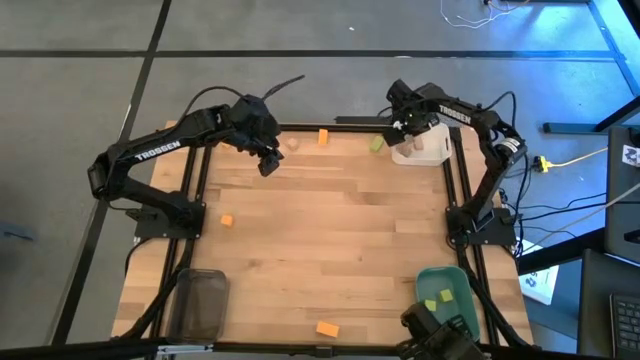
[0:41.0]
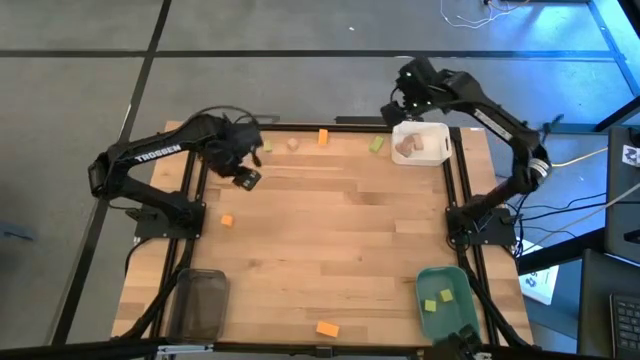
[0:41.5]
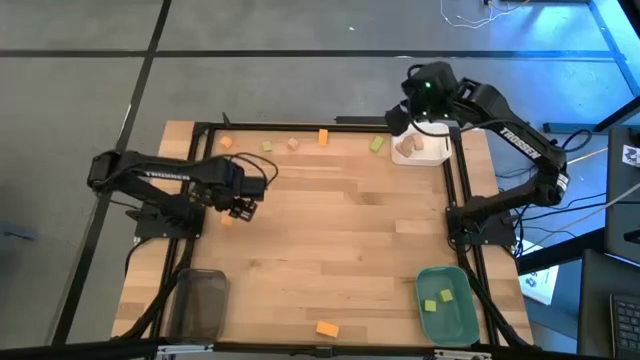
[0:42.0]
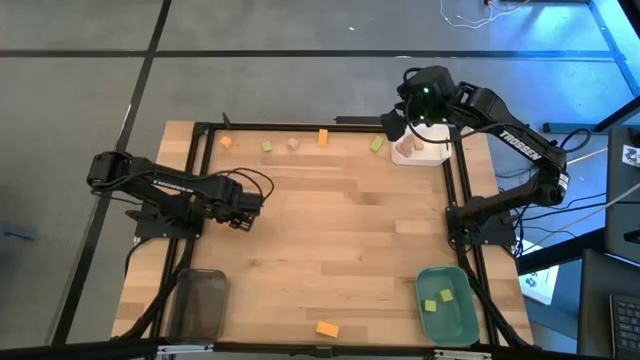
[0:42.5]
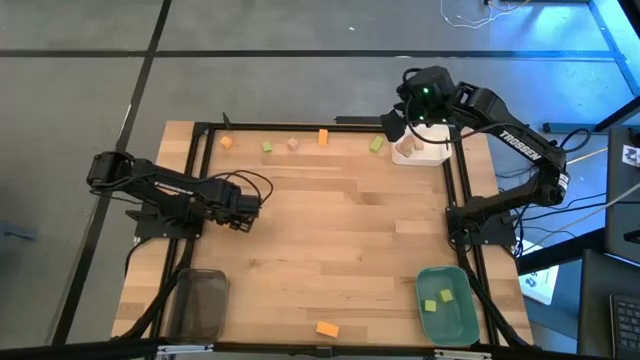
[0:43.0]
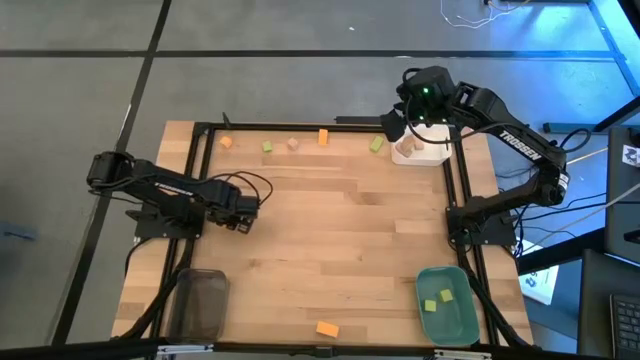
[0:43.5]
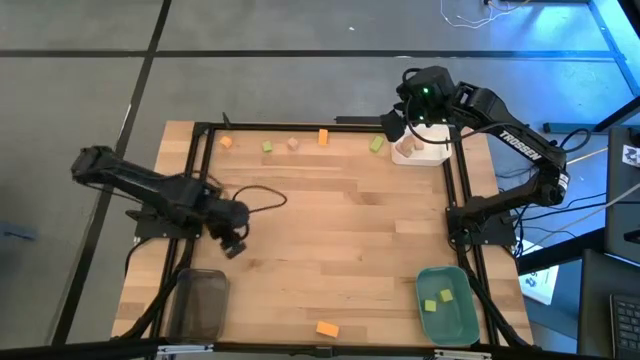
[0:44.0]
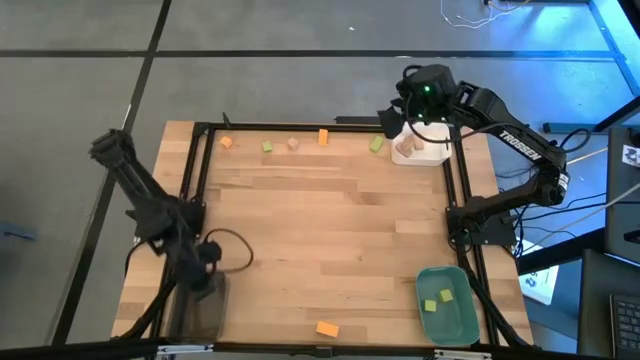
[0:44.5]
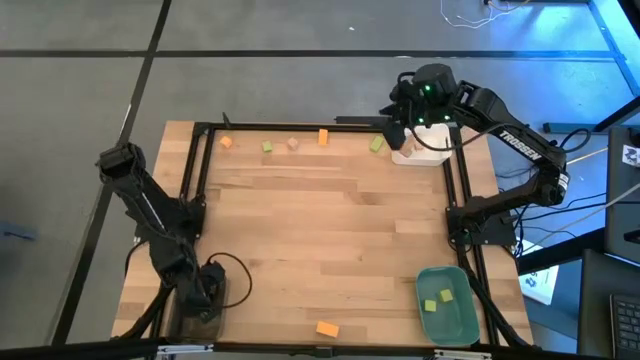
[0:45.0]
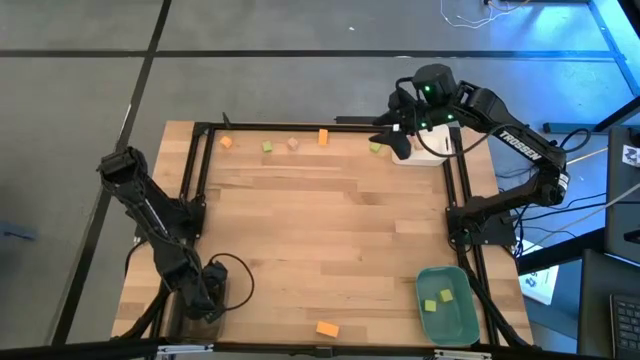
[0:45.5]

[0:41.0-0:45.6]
Task: Sort & place blocks by color
Put the bottom left yellow block into the black bin

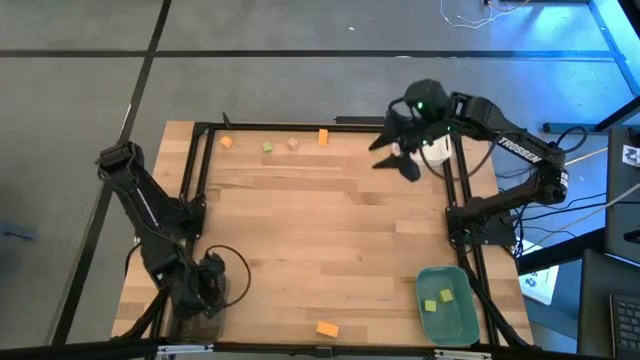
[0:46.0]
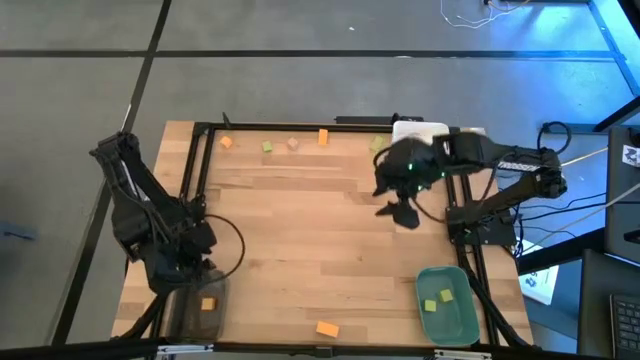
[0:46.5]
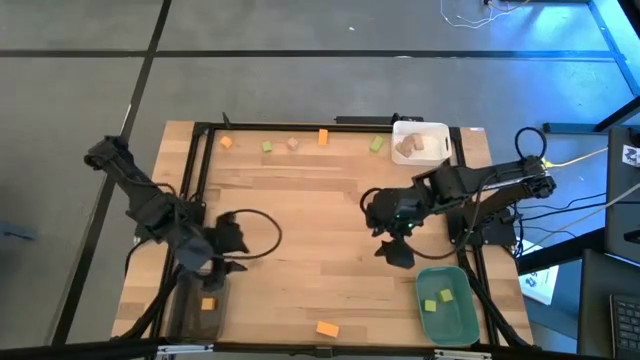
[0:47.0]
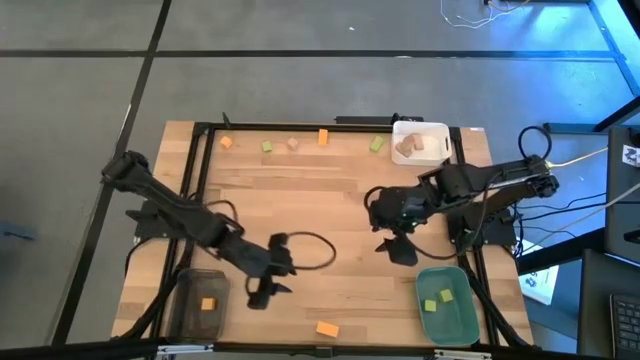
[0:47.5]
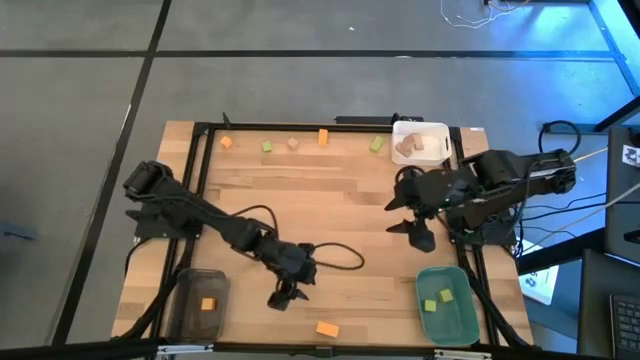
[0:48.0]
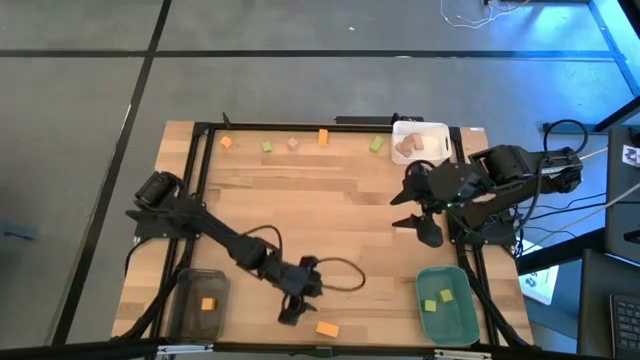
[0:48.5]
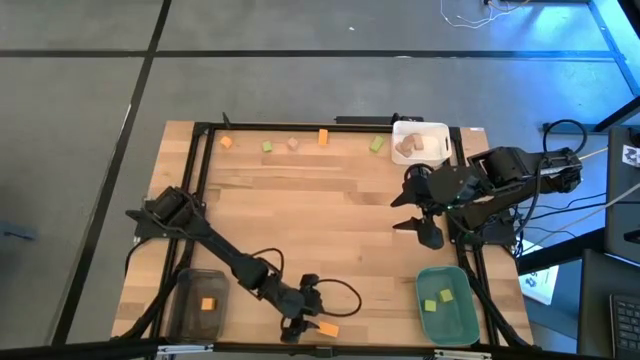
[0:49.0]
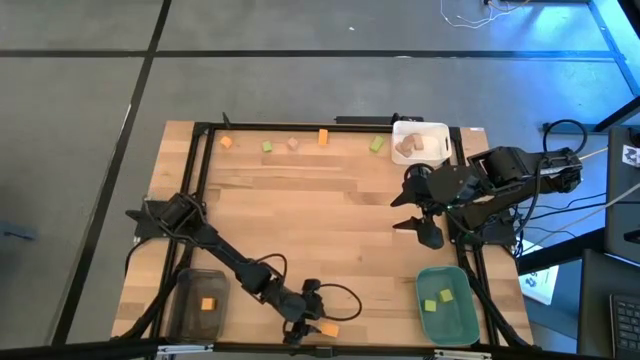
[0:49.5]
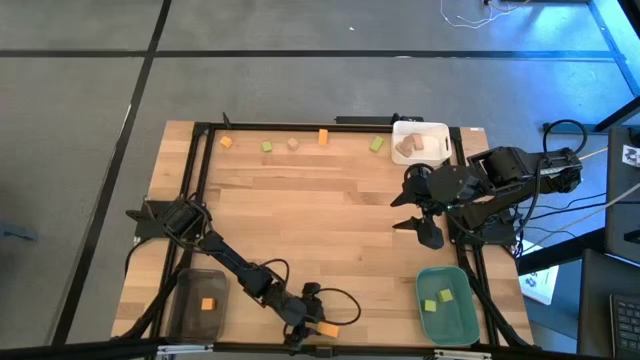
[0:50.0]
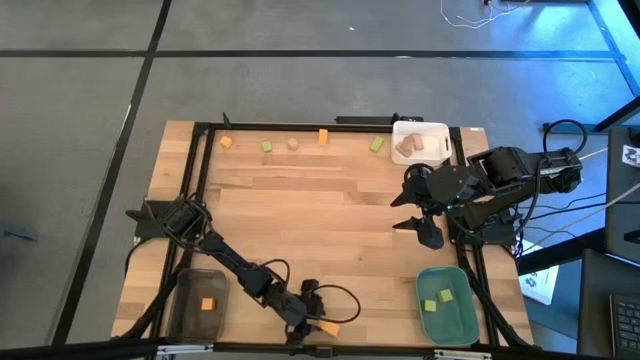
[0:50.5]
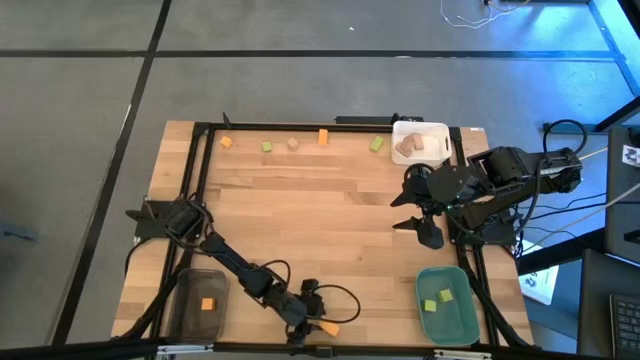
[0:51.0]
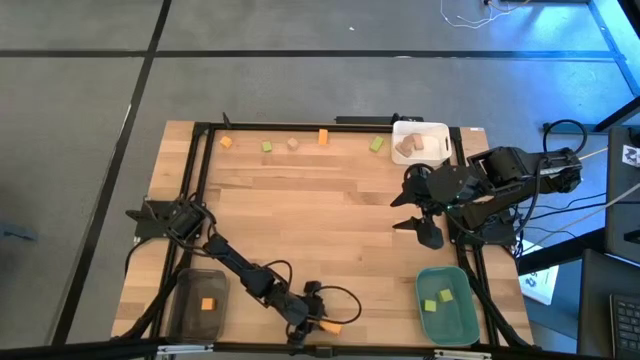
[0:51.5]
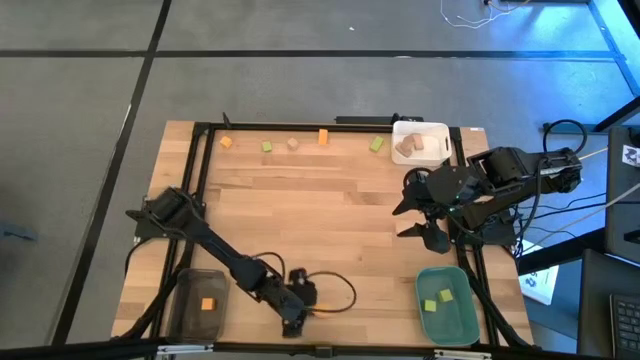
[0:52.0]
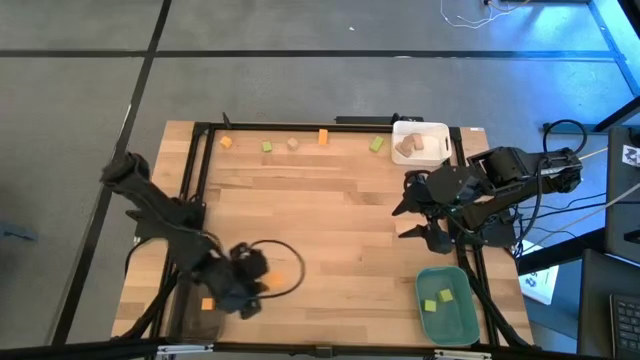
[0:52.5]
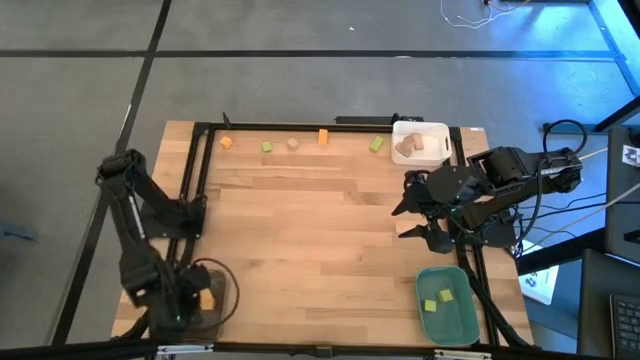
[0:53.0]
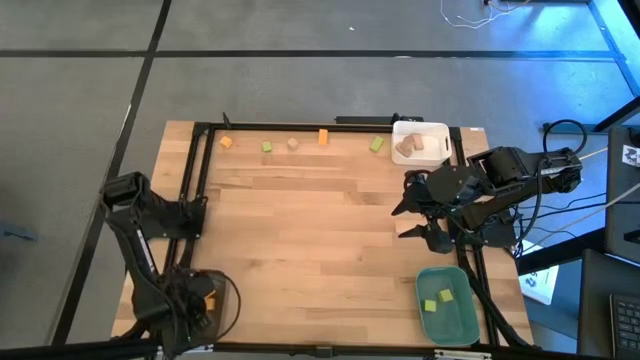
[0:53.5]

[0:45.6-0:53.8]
Put the bottom yellow block into the black bin

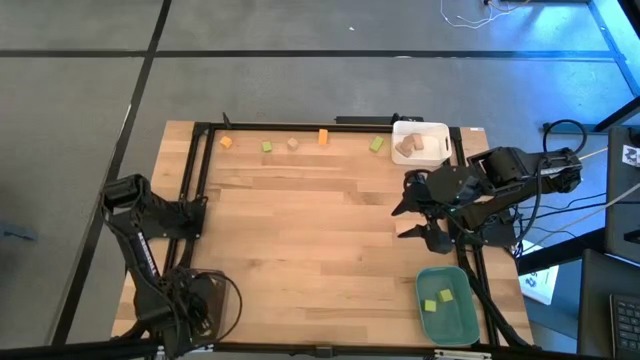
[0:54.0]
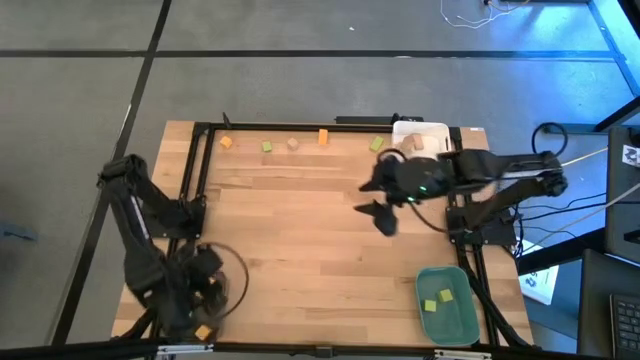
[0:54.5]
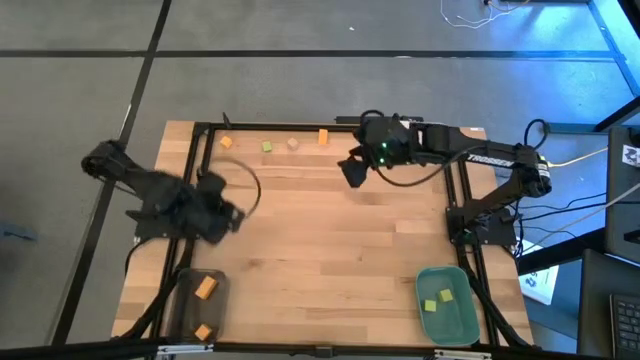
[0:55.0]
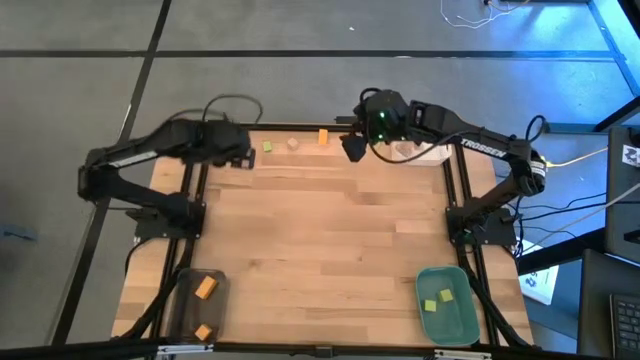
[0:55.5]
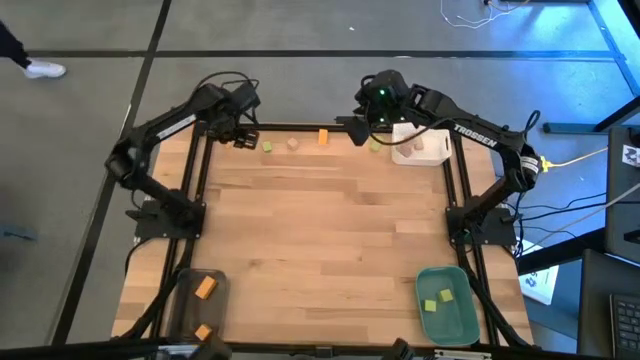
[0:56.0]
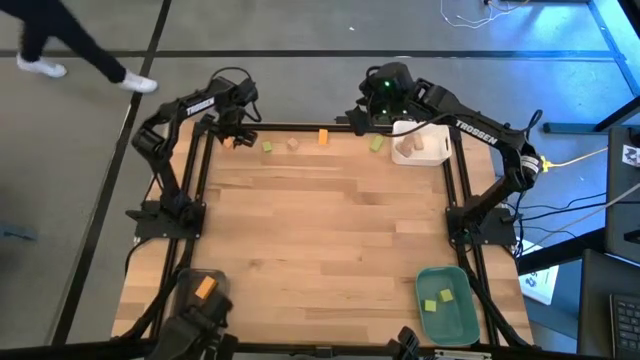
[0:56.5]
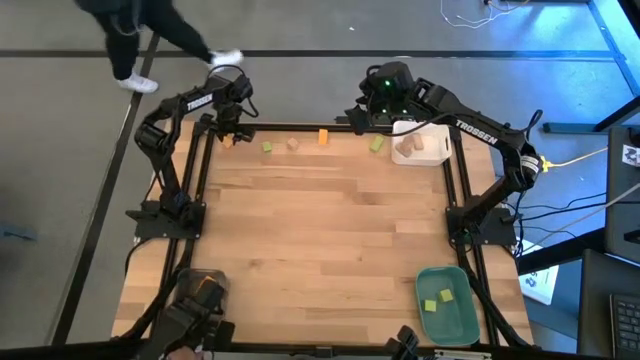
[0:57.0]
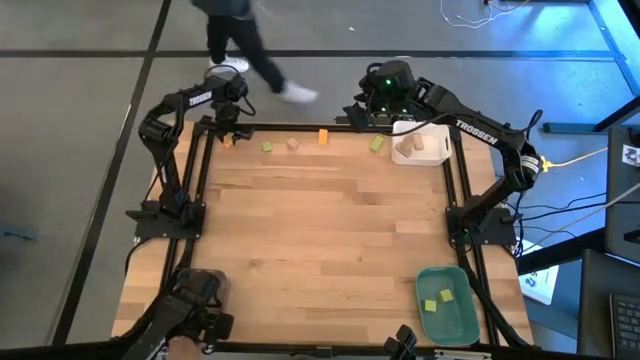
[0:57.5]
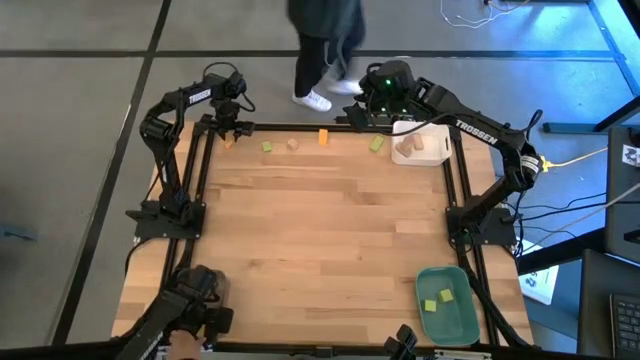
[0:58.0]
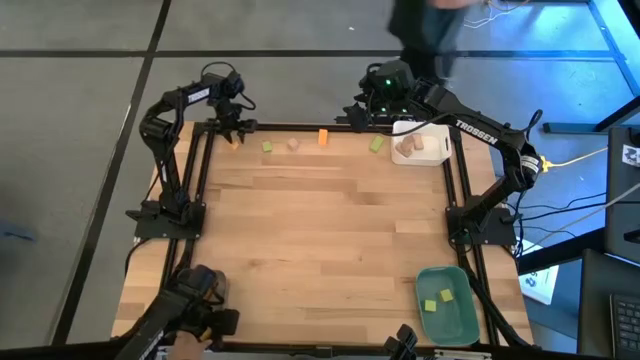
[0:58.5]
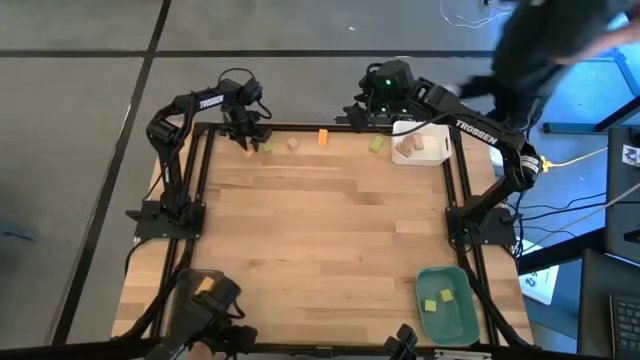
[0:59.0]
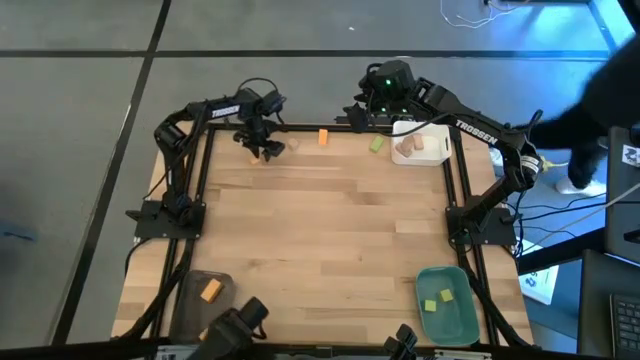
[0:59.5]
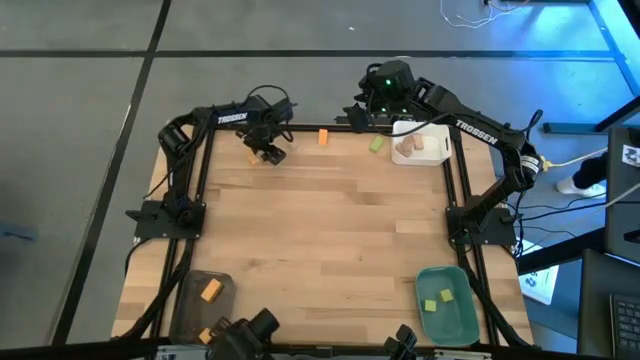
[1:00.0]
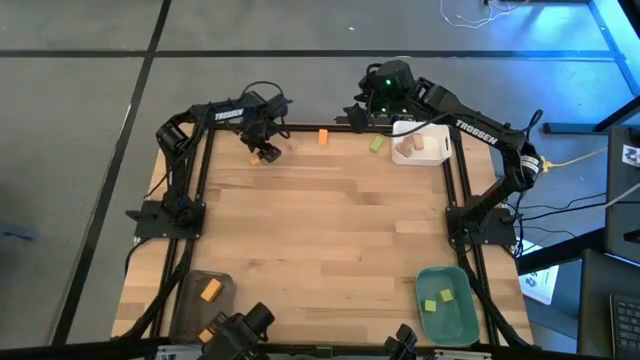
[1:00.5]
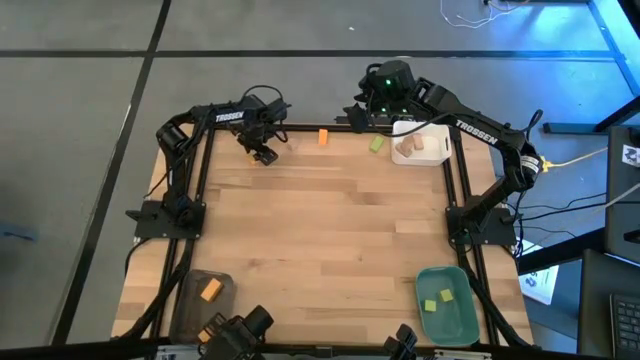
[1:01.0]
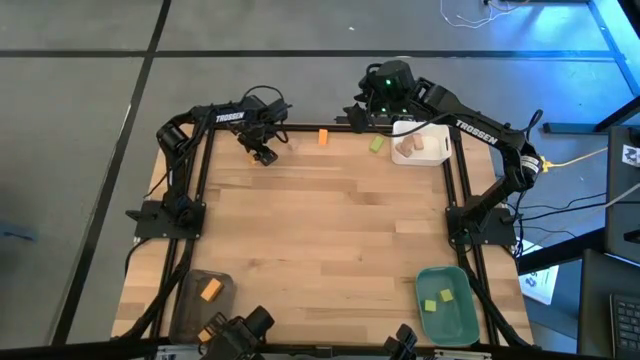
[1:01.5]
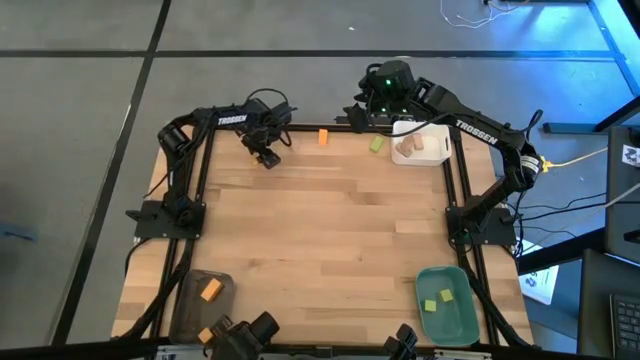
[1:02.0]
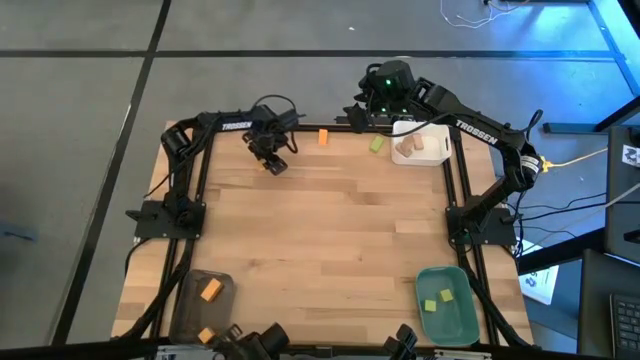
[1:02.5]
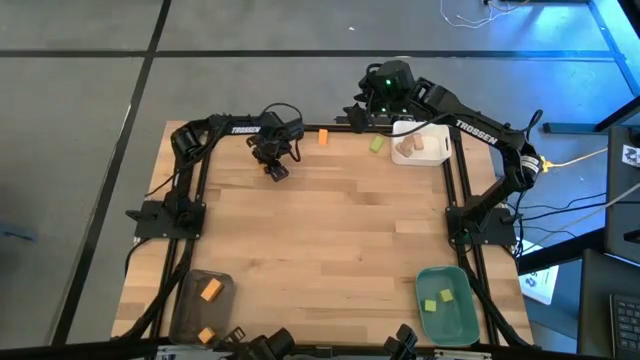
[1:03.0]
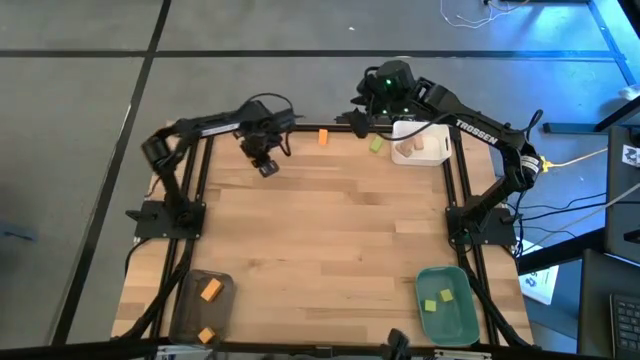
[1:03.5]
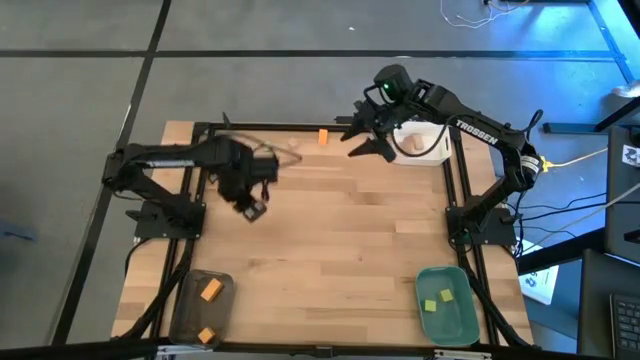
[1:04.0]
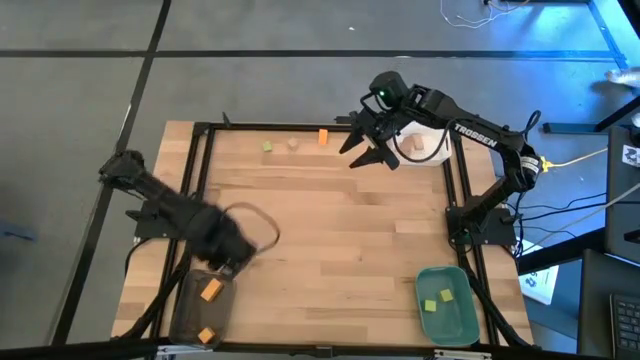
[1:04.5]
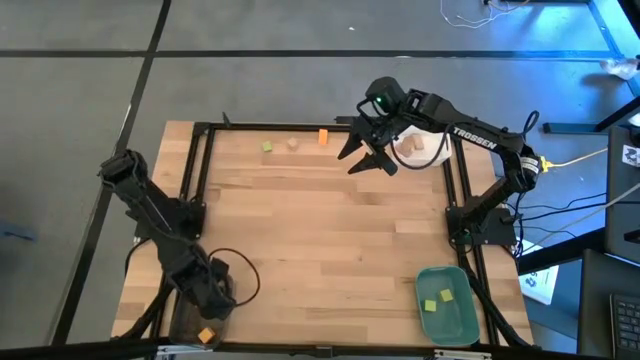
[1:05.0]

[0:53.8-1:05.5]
Put the left yellow block into the black bin
